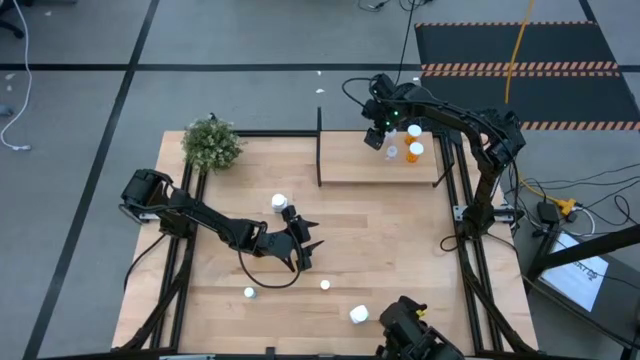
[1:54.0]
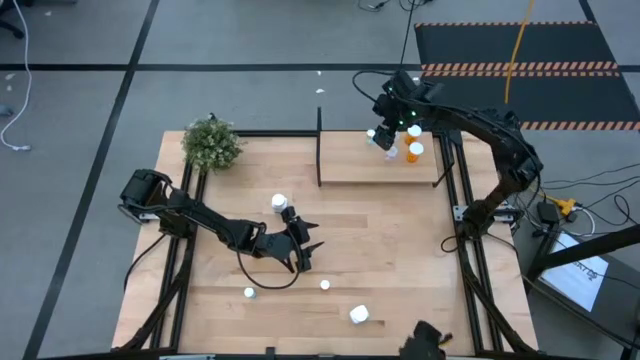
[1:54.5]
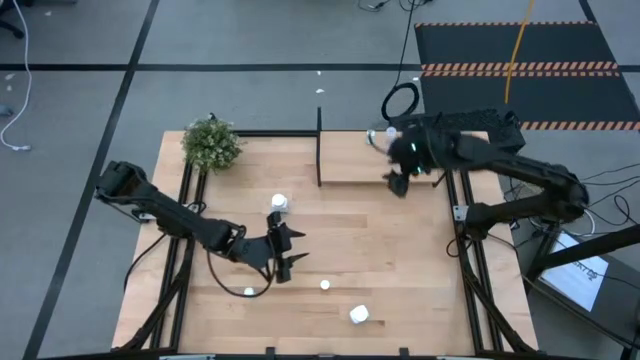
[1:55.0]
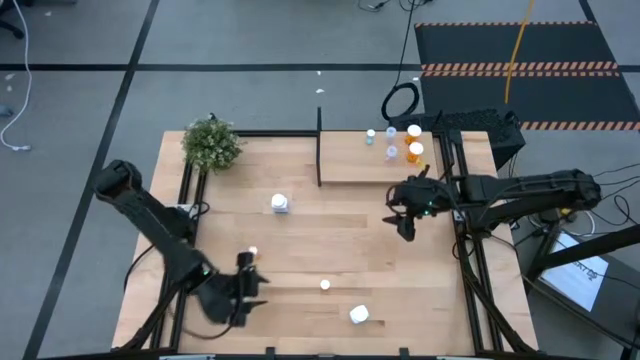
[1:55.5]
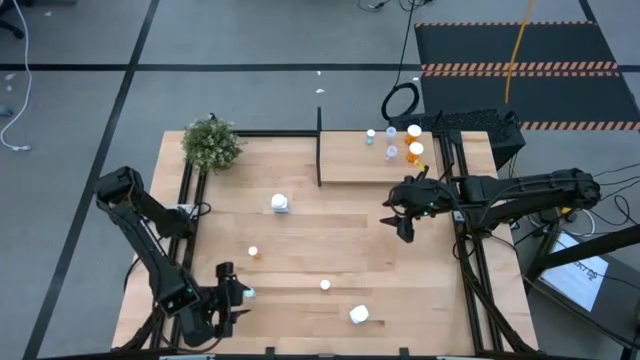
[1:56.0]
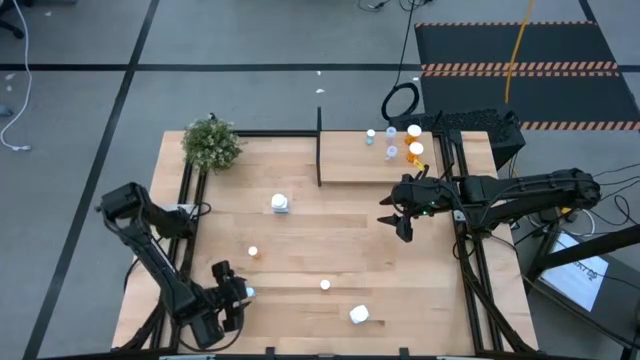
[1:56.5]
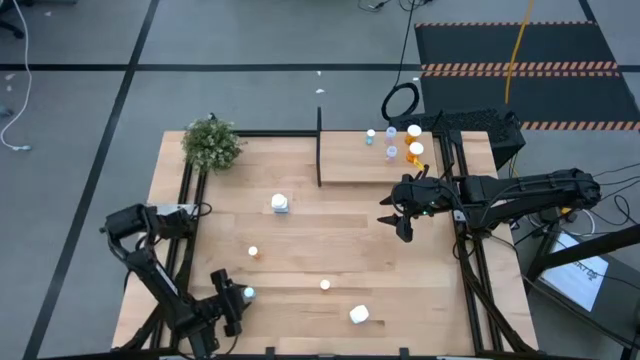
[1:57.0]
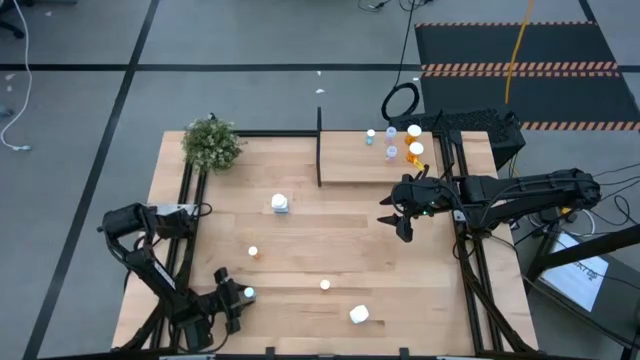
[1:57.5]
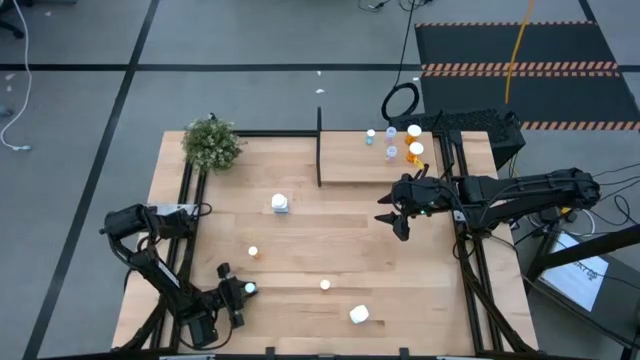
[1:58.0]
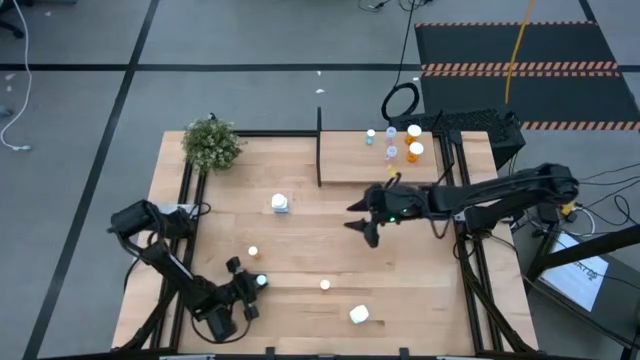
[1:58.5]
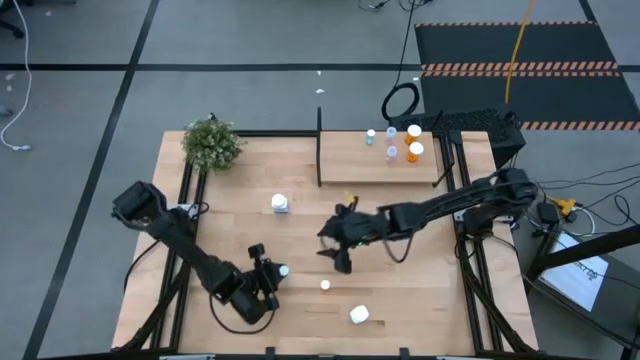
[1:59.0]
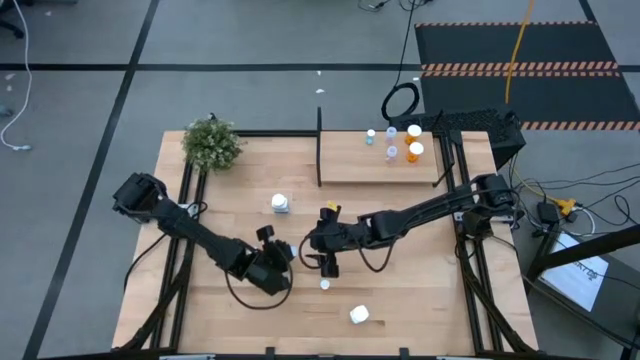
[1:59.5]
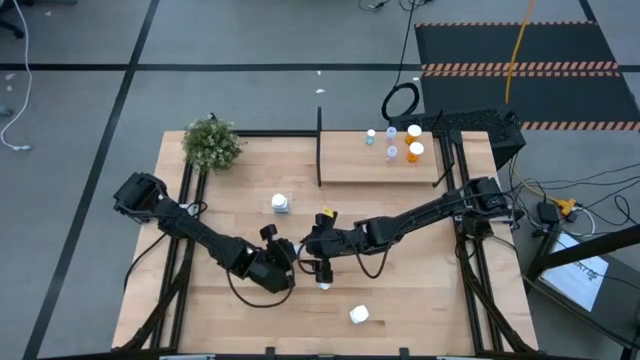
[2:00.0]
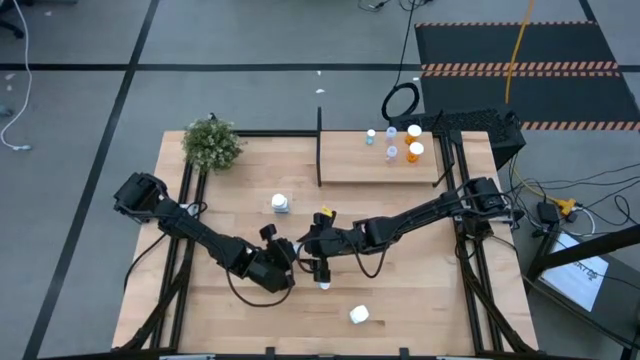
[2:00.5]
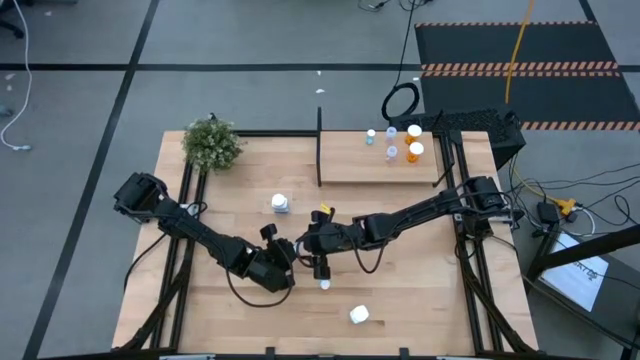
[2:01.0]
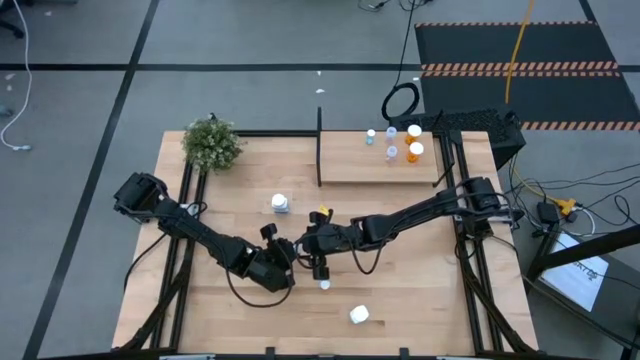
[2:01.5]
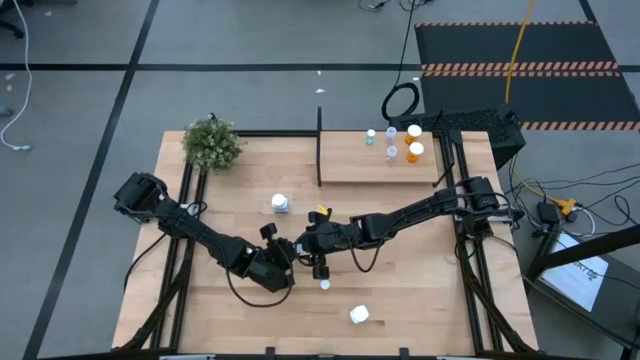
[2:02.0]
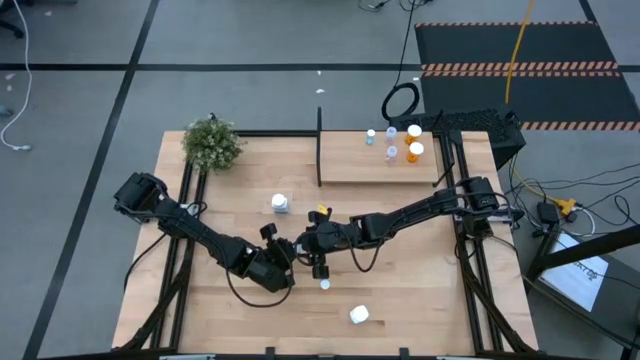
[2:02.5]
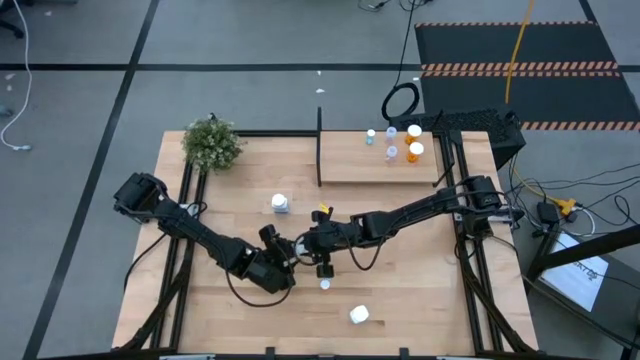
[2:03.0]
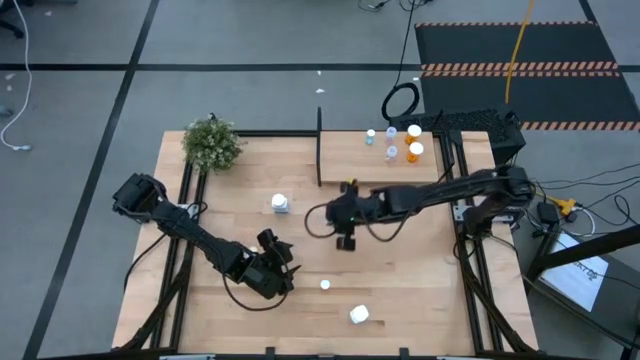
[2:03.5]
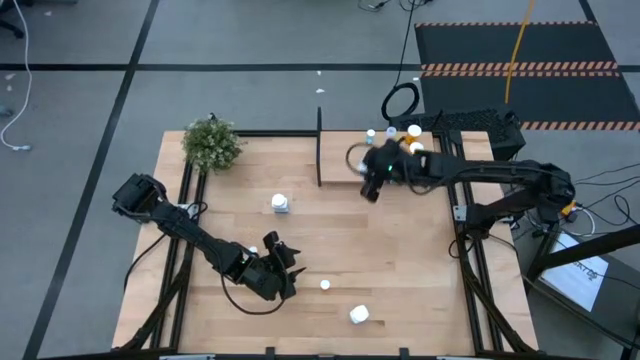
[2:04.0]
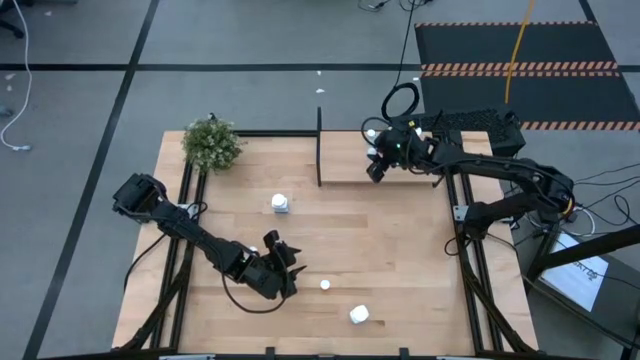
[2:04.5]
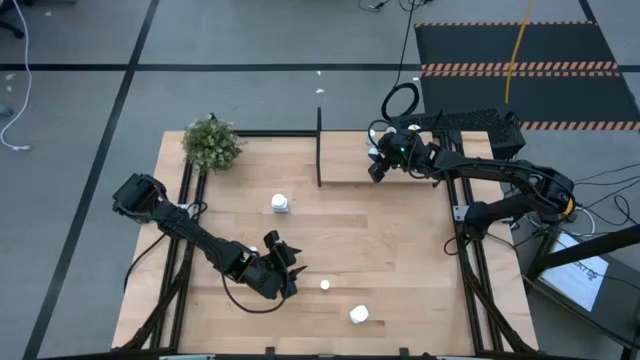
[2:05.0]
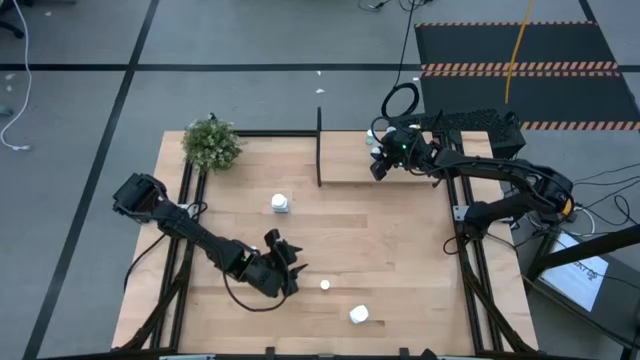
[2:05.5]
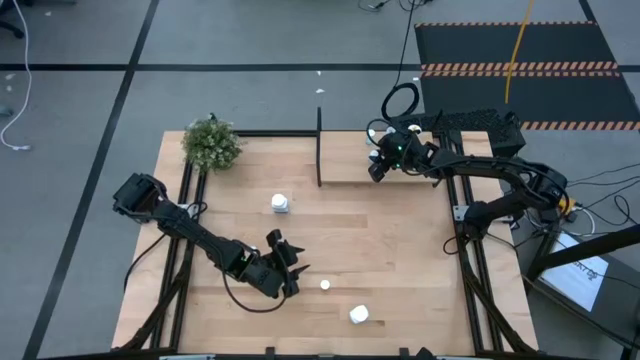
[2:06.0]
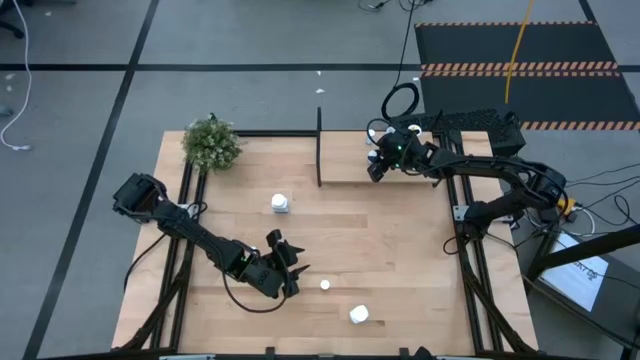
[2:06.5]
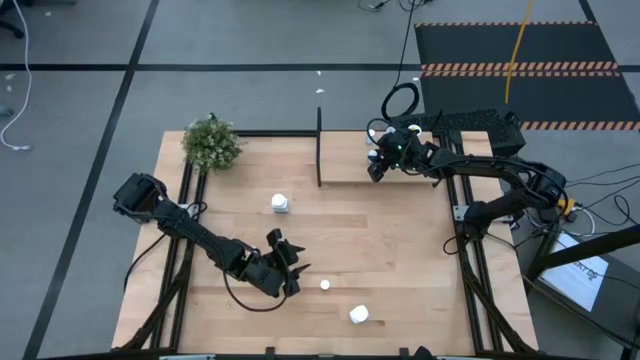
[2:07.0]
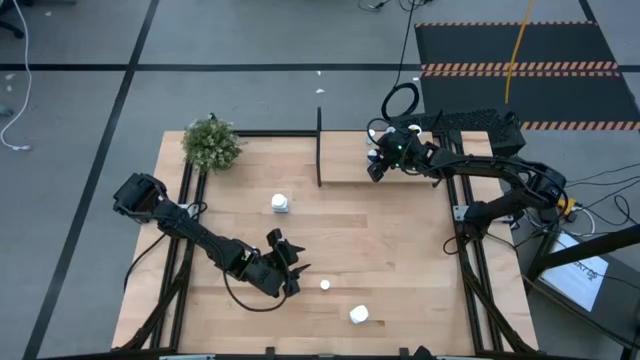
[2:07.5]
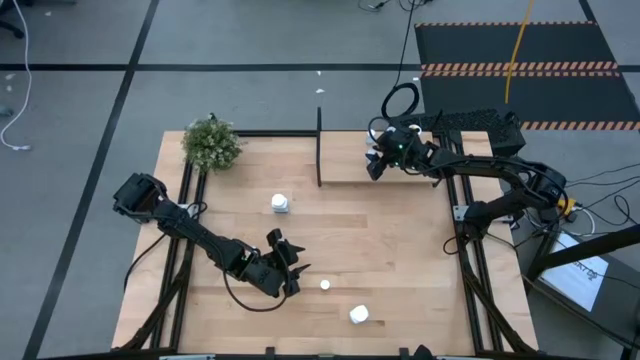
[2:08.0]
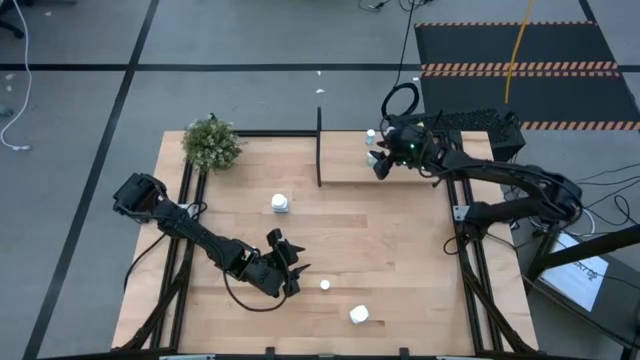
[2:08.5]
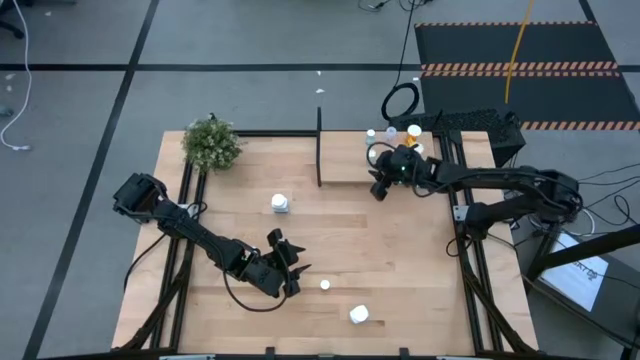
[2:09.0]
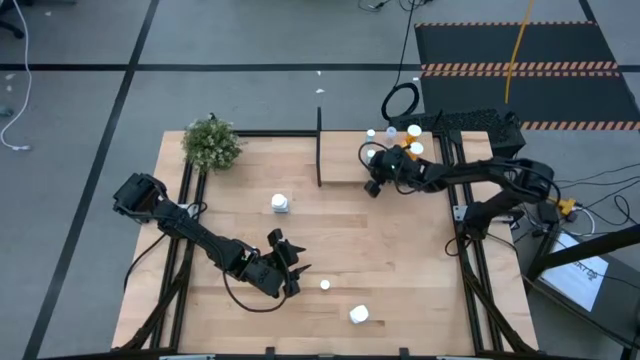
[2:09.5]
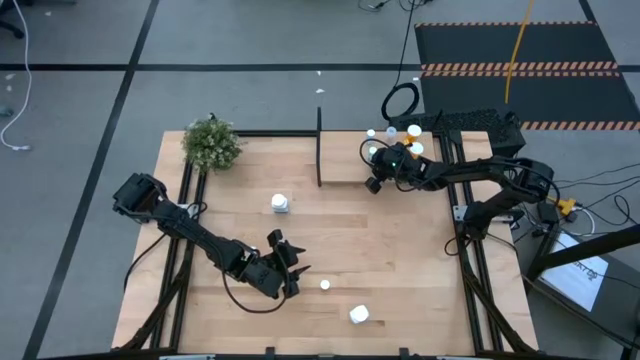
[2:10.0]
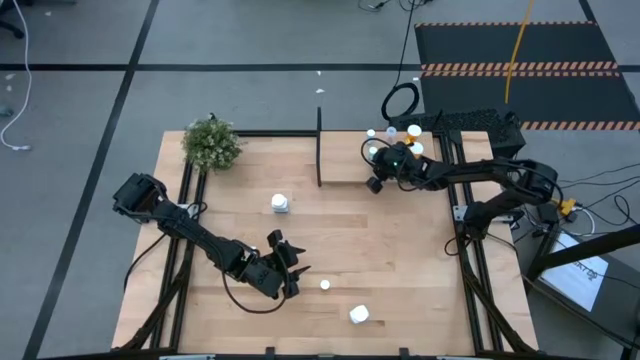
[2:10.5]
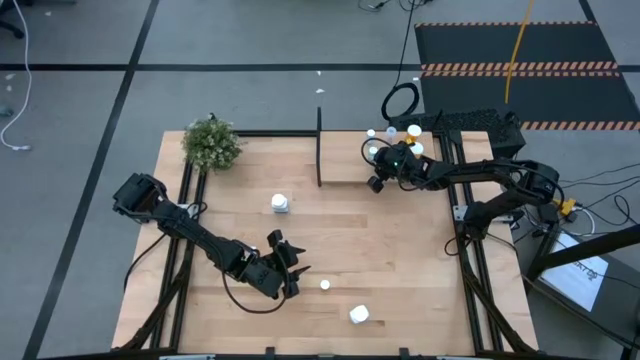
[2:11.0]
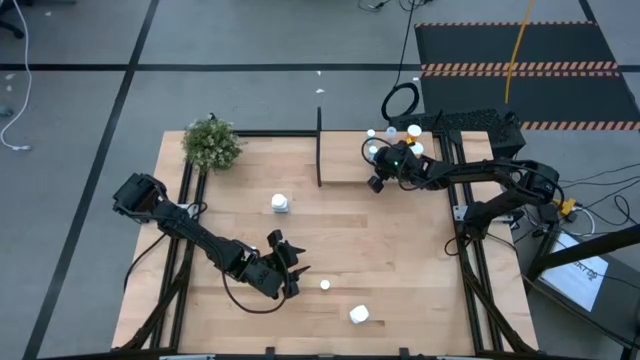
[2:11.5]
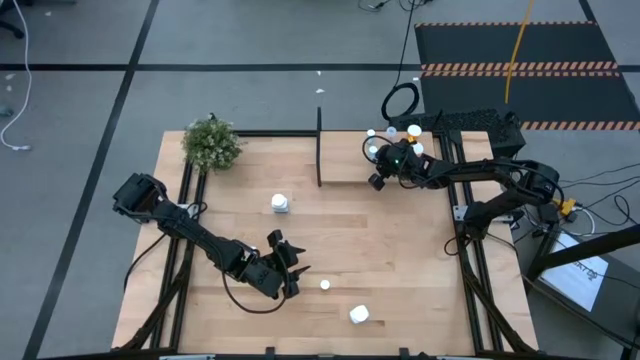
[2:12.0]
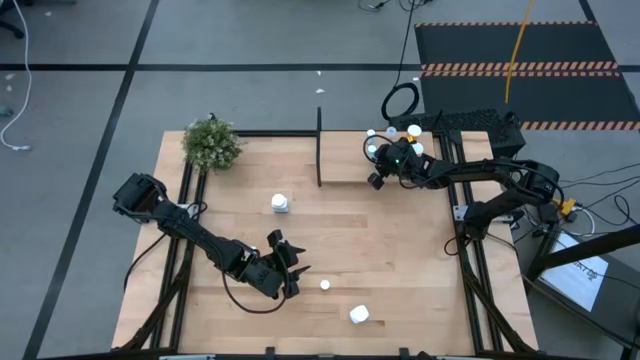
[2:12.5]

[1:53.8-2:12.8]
Task: Pick and place medicine bottles onto shelf by color
Put the blue pill bottle on the shelf aligned with the other blue pill bottle
